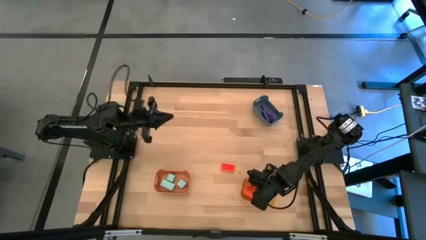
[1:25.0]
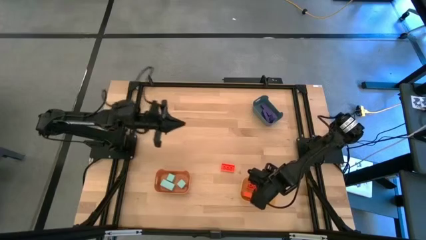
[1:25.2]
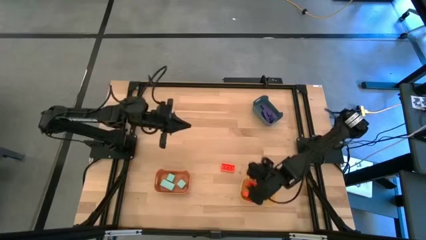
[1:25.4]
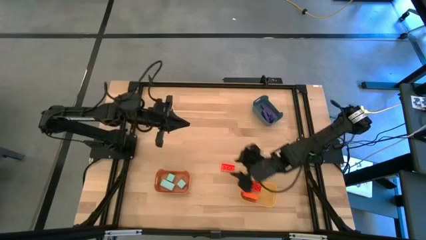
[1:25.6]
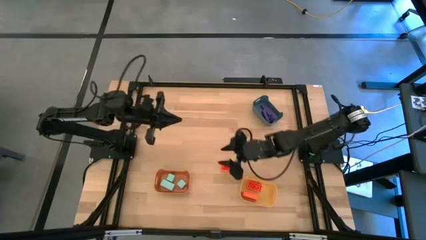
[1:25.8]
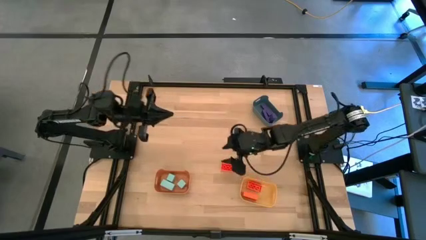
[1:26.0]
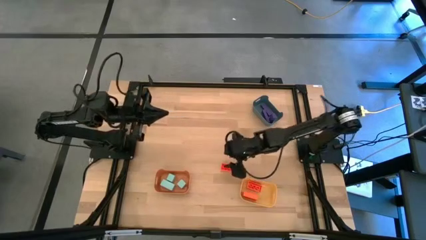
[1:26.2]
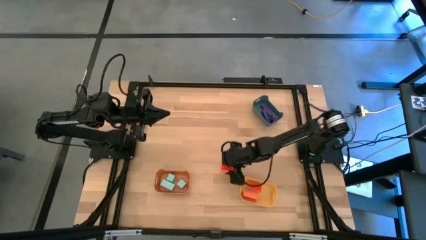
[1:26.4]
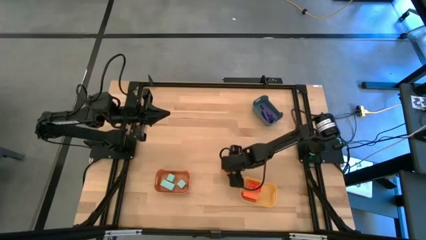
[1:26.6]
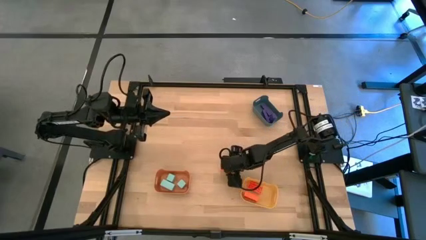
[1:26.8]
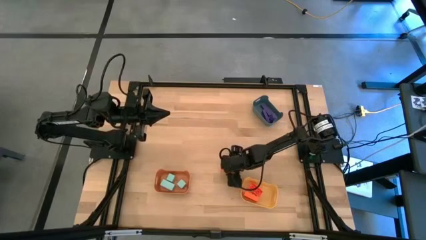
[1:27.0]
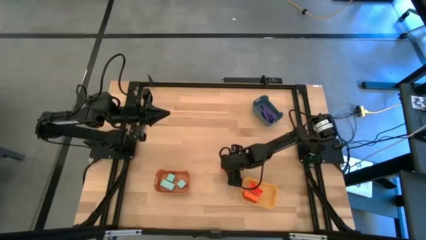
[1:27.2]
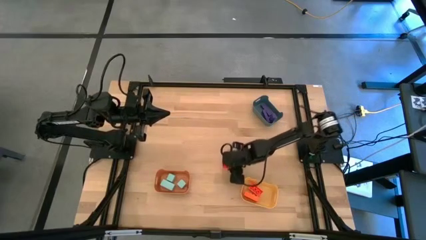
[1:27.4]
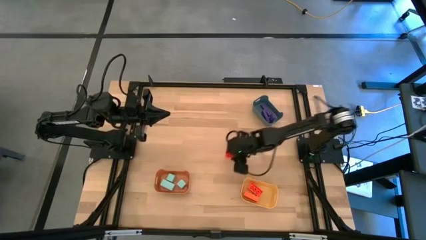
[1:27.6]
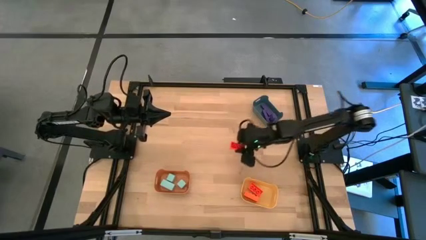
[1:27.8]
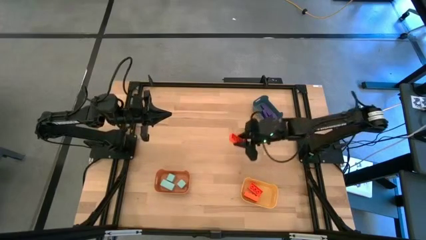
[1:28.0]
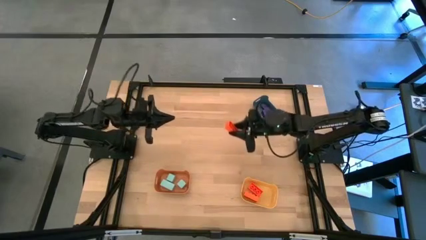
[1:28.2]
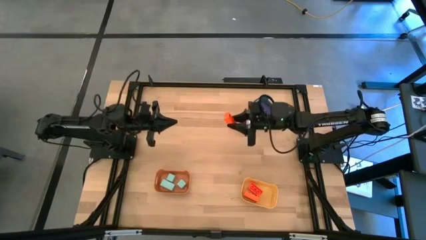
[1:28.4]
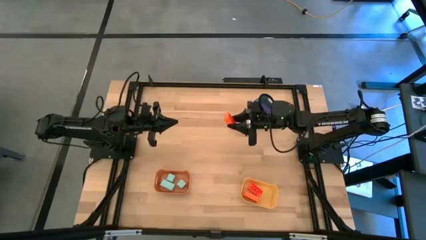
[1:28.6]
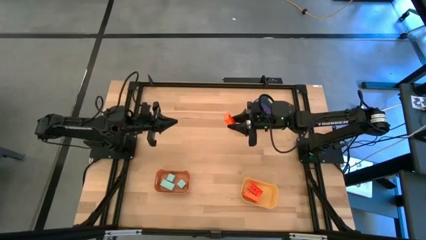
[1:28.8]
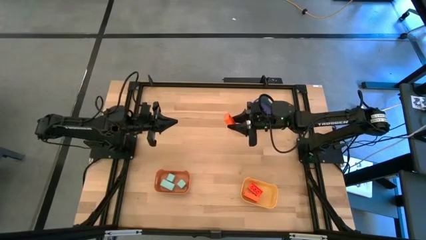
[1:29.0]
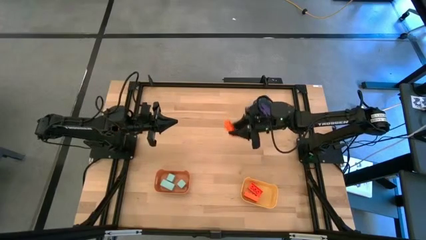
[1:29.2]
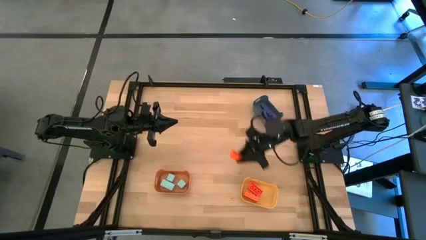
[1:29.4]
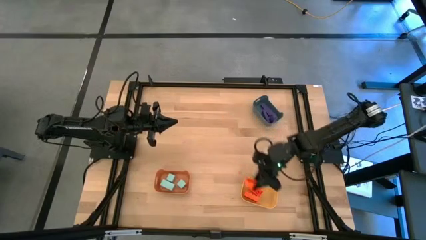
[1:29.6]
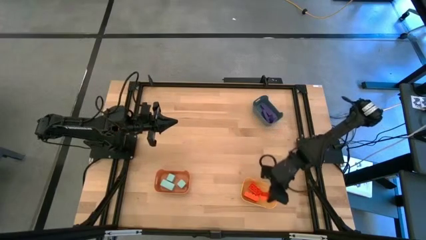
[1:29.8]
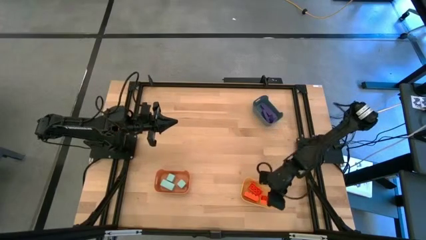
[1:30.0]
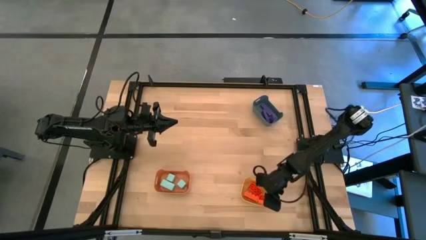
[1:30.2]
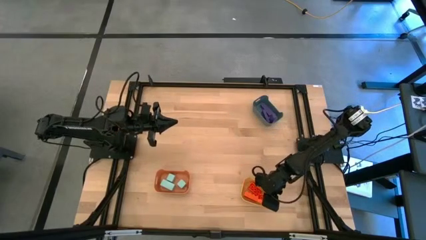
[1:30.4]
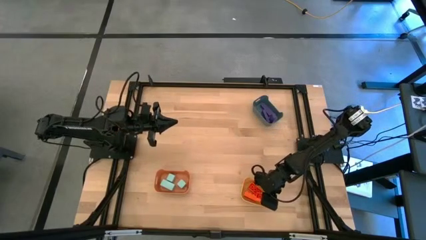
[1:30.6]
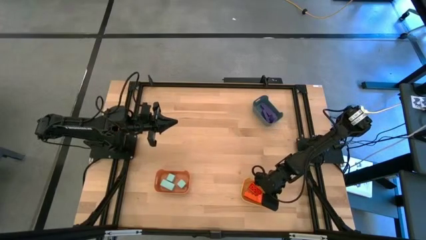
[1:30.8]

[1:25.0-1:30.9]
Task: Sort & place blocks by color
Put the orange game piece into the yellow bin

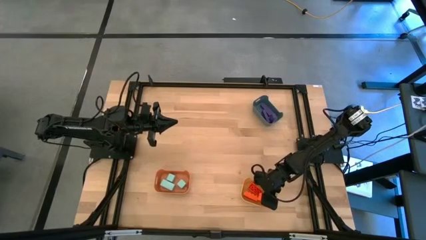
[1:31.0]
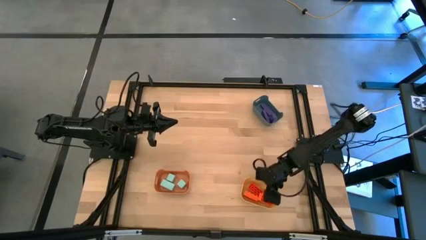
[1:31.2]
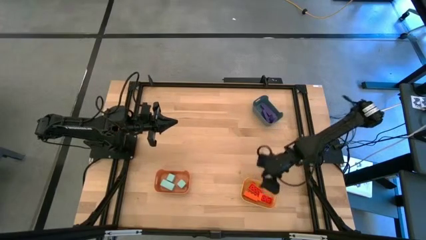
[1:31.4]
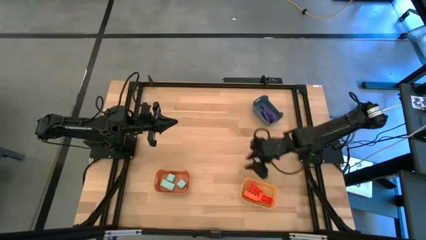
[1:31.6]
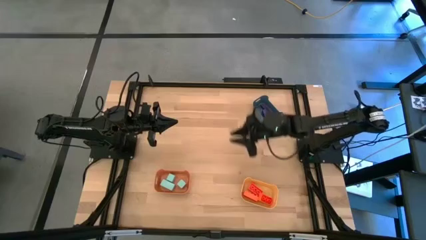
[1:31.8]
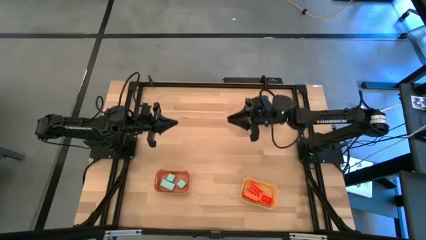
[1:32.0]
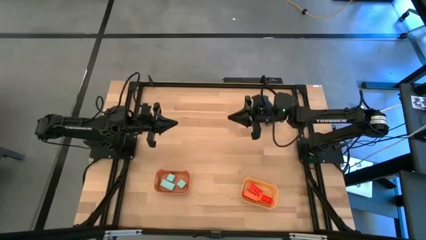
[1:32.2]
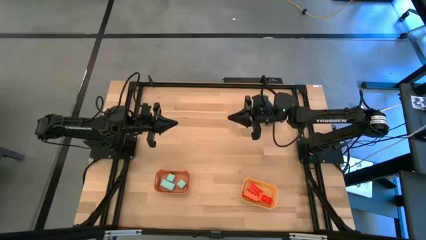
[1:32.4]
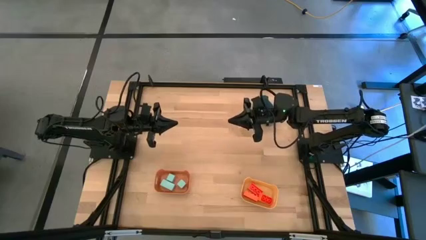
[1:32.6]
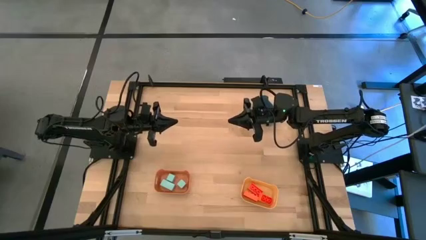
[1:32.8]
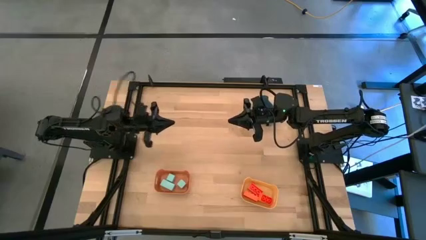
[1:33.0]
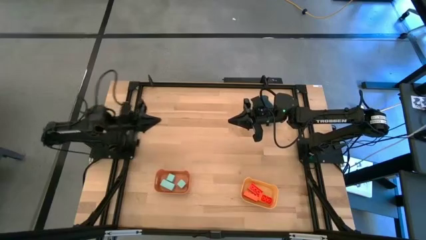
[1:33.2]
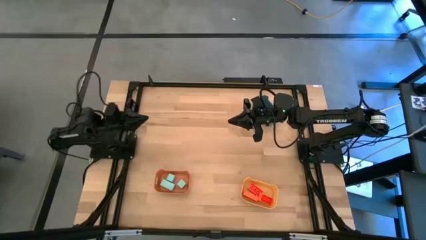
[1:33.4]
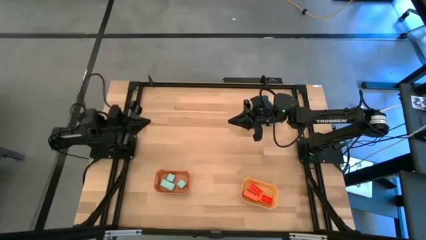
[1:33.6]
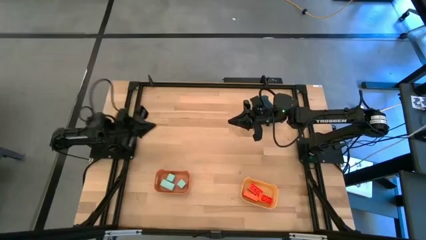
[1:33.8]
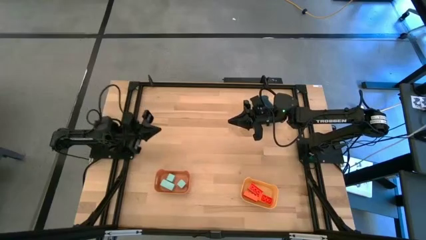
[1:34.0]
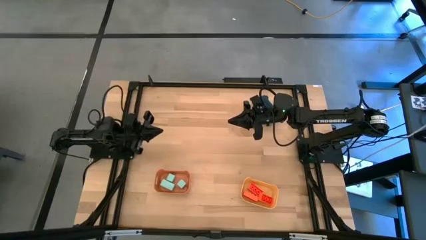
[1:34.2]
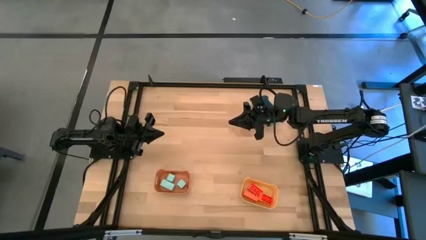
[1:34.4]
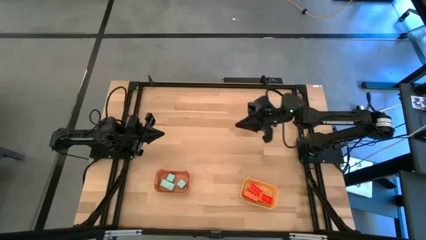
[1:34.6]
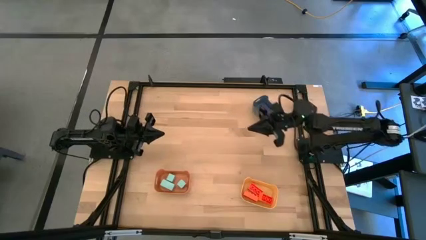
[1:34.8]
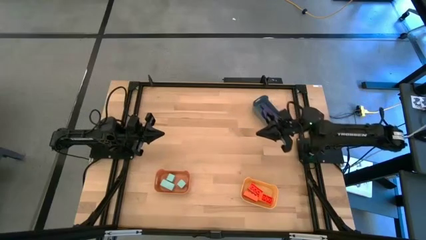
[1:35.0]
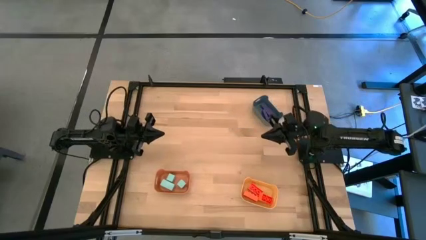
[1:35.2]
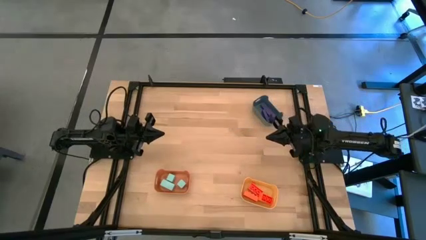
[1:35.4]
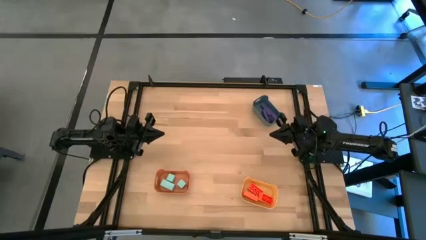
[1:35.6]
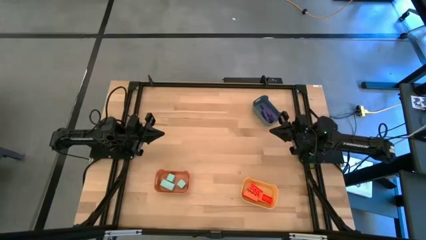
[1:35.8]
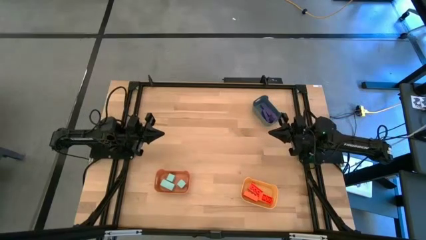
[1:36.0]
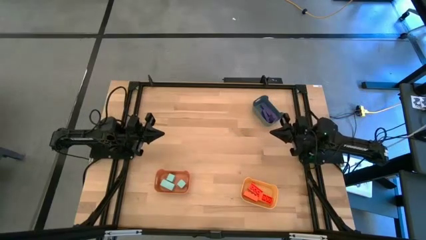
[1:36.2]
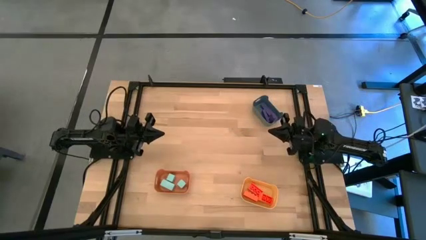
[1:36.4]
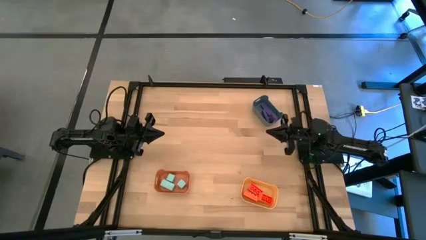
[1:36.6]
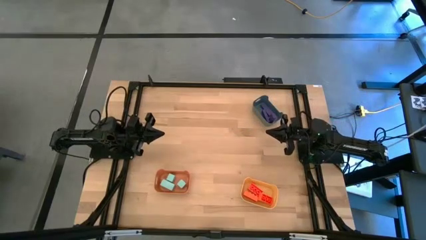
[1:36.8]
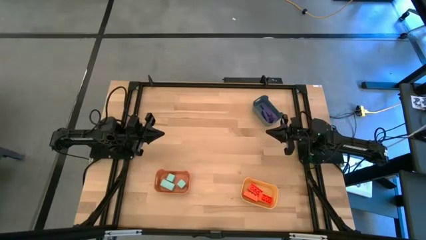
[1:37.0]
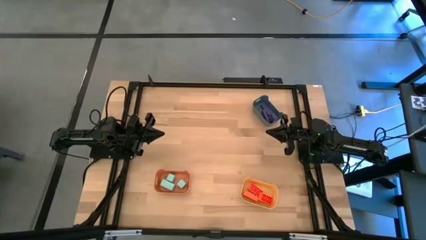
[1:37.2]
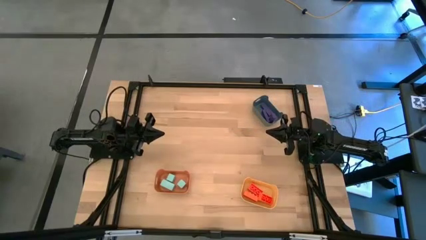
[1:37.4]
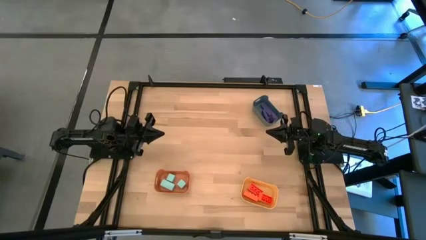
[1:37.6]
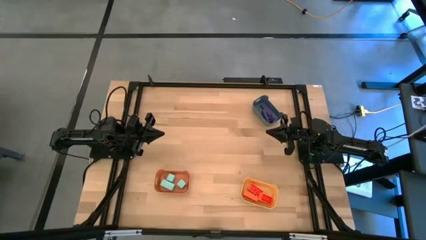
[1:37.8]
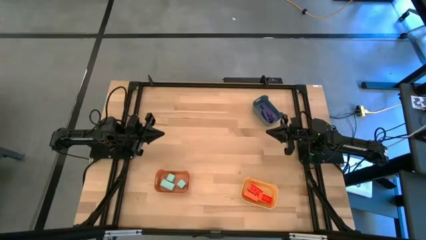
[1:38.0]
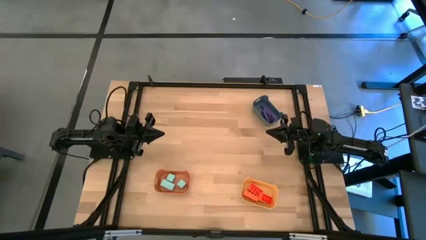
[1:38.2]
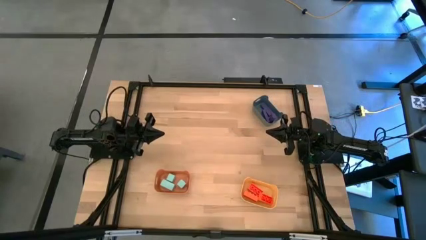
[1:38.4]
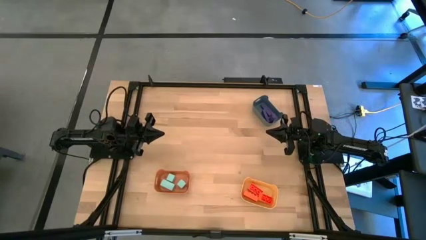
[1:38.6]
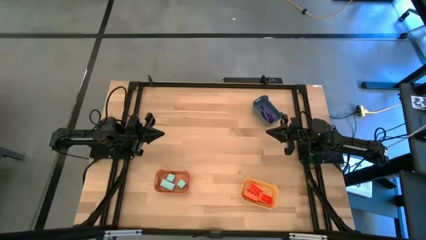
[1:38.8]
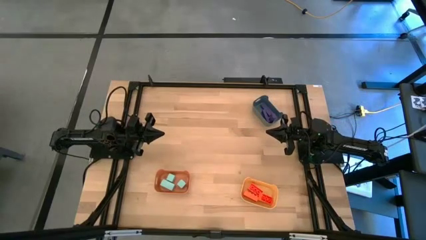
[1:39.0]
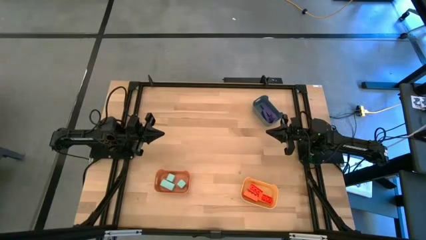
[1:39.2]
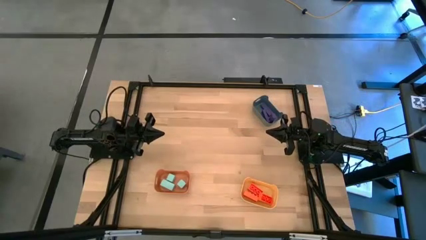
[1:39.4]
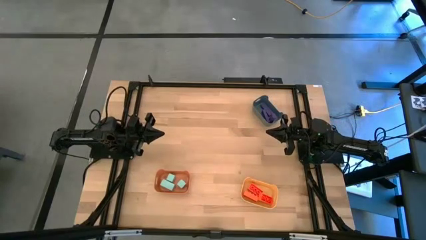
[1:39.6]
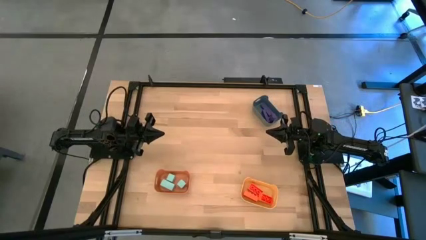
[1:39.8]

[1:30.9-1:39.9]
Return to Home Position
